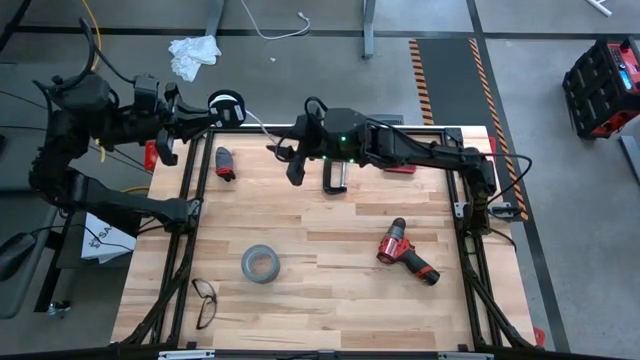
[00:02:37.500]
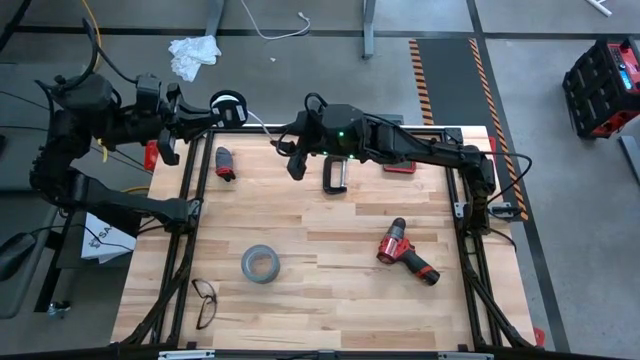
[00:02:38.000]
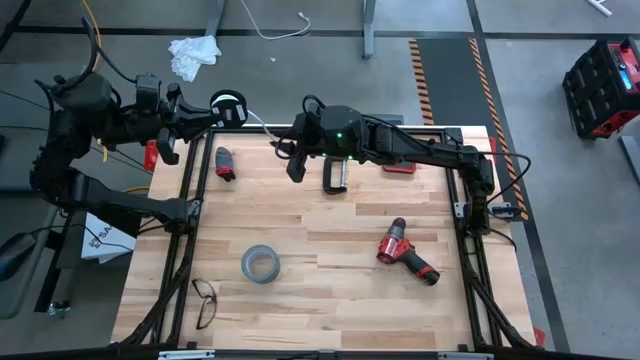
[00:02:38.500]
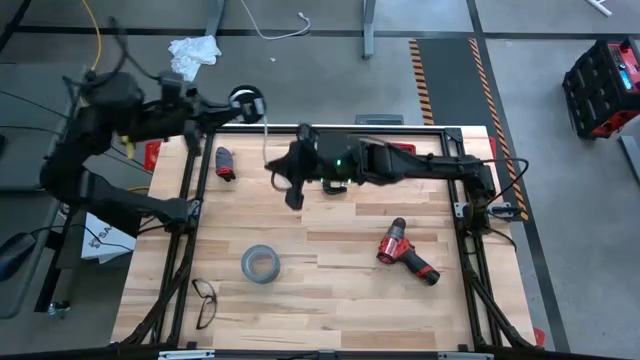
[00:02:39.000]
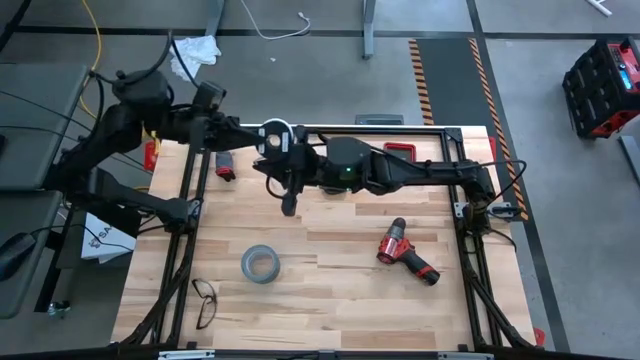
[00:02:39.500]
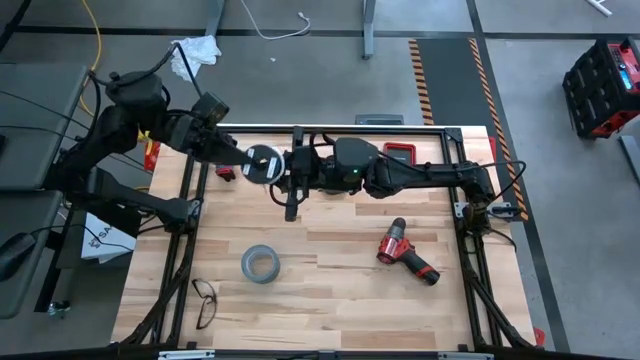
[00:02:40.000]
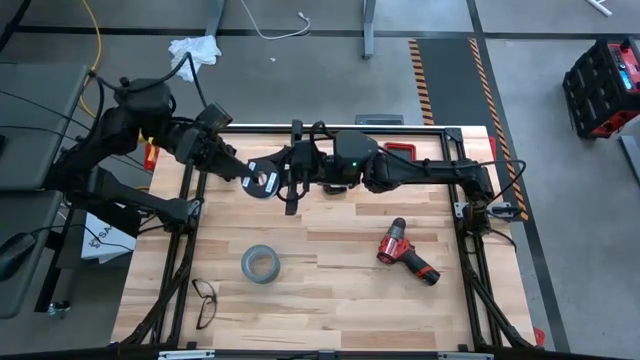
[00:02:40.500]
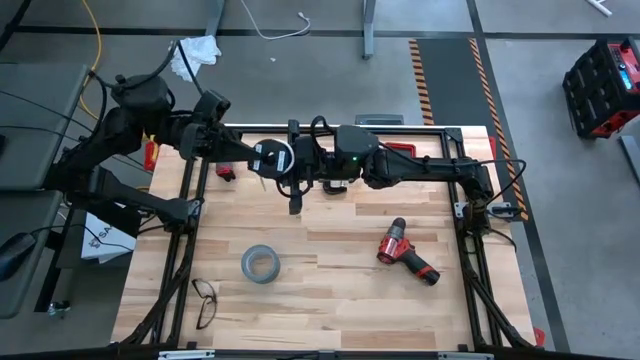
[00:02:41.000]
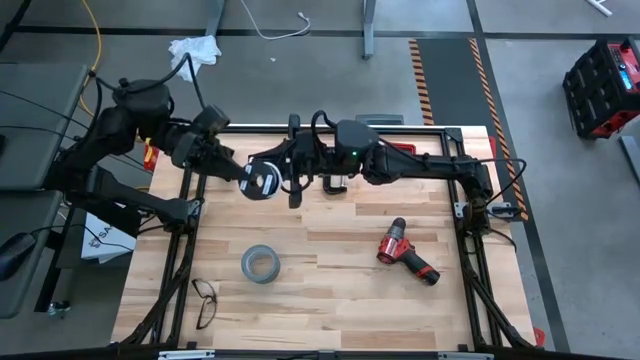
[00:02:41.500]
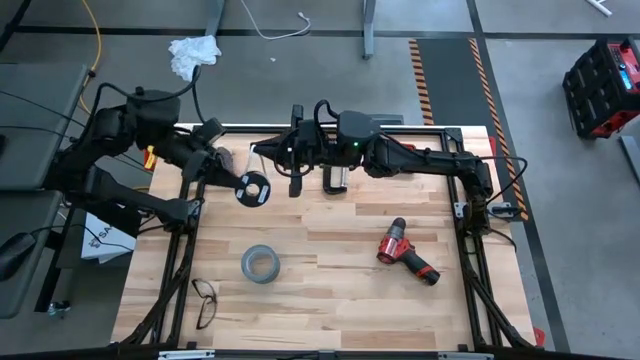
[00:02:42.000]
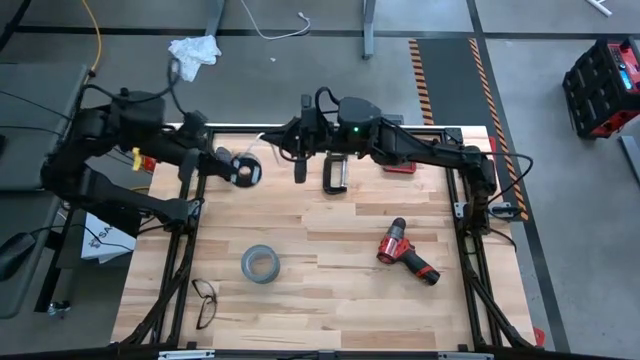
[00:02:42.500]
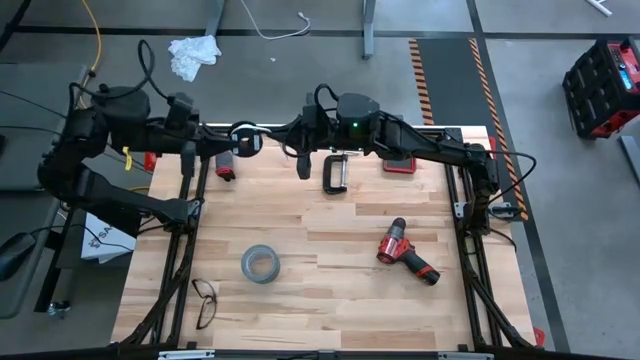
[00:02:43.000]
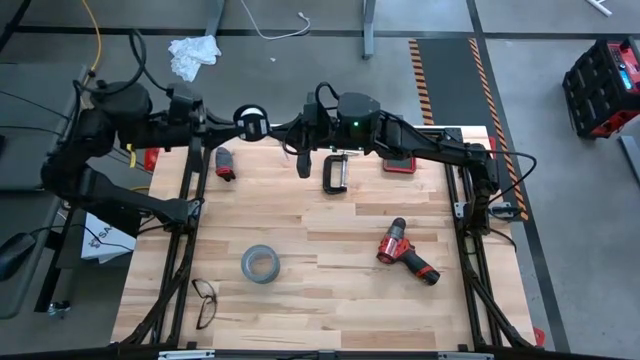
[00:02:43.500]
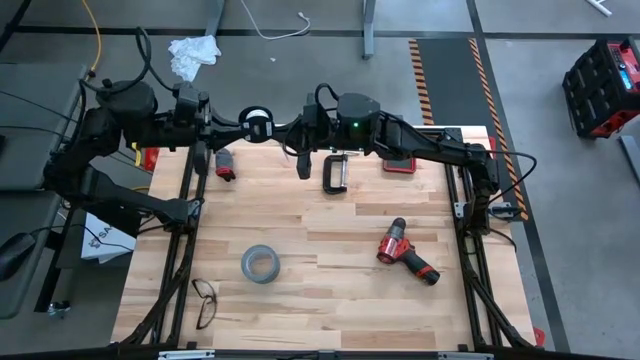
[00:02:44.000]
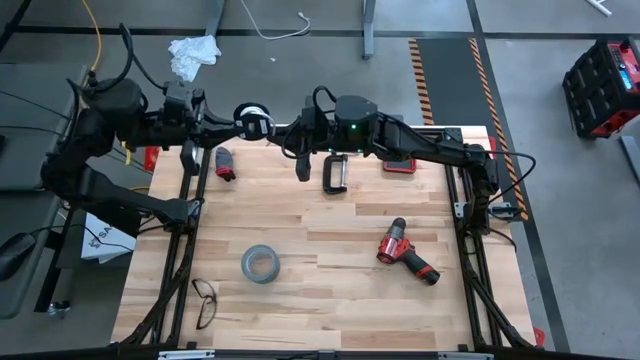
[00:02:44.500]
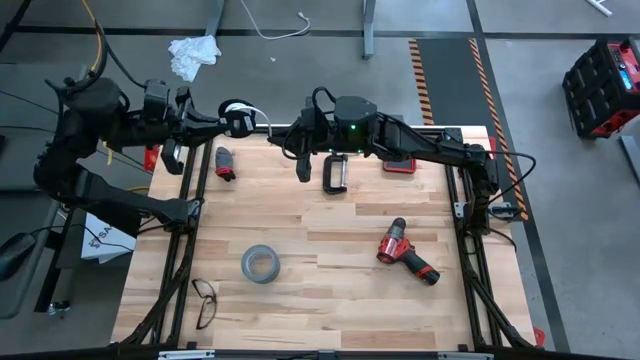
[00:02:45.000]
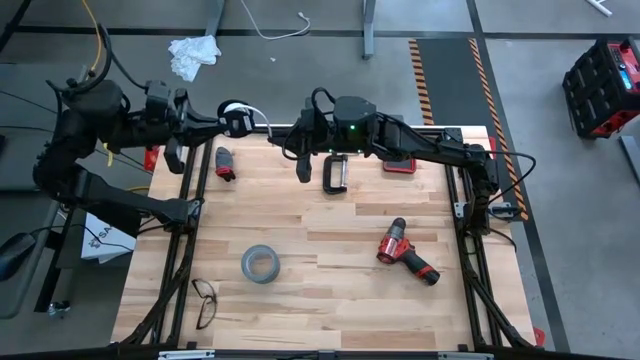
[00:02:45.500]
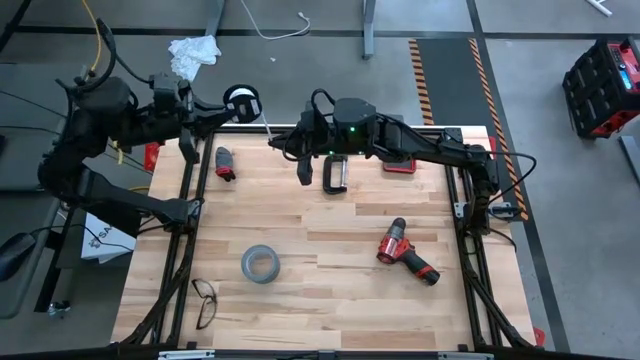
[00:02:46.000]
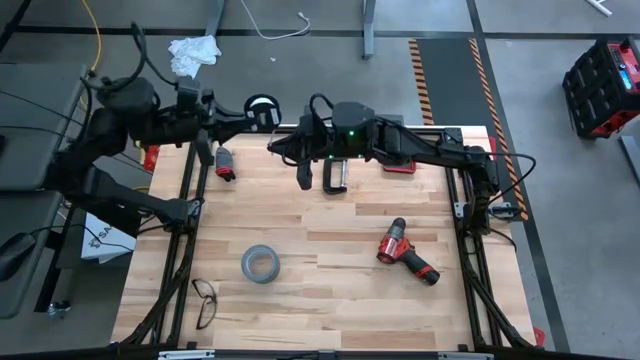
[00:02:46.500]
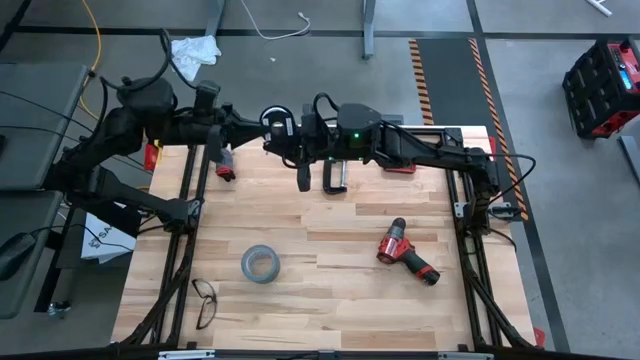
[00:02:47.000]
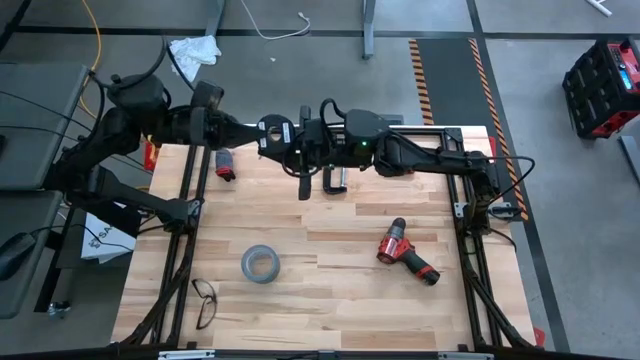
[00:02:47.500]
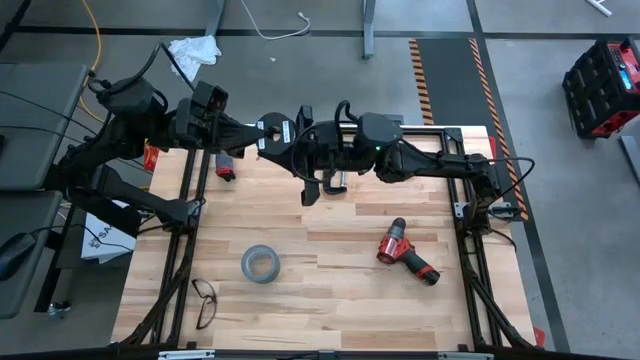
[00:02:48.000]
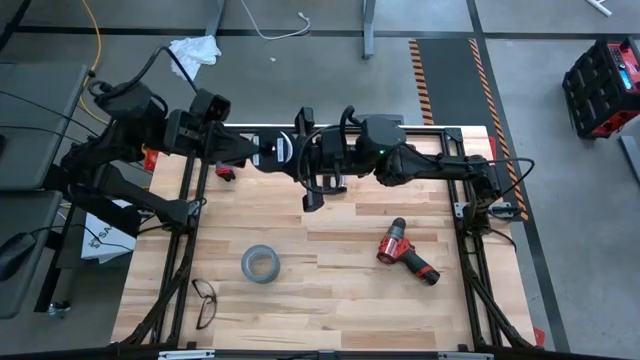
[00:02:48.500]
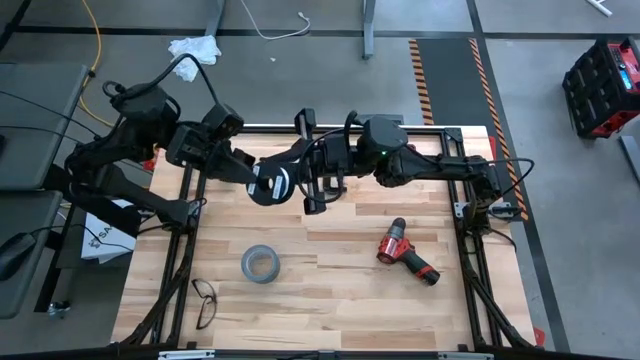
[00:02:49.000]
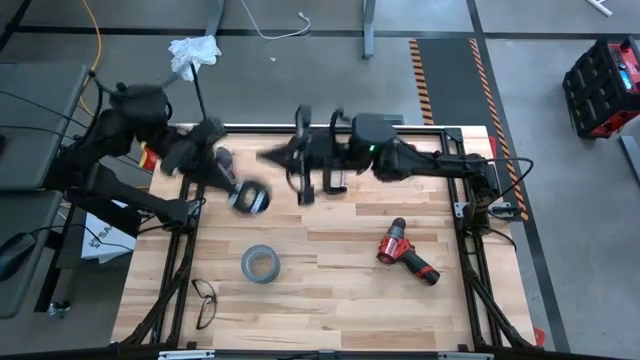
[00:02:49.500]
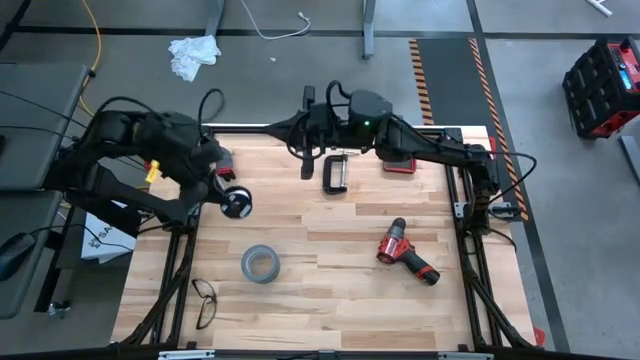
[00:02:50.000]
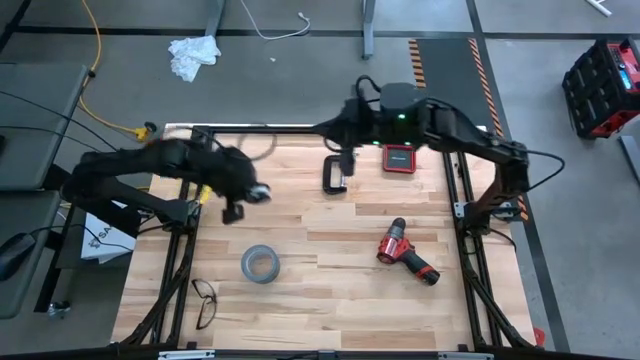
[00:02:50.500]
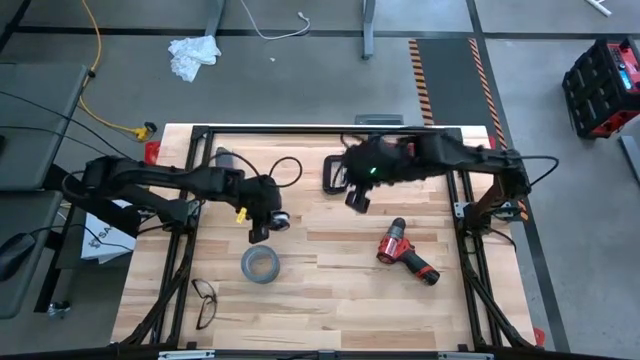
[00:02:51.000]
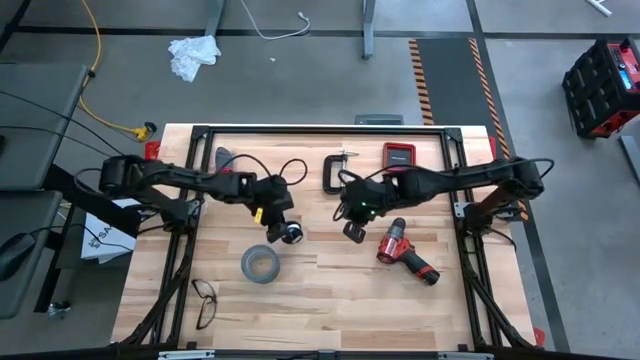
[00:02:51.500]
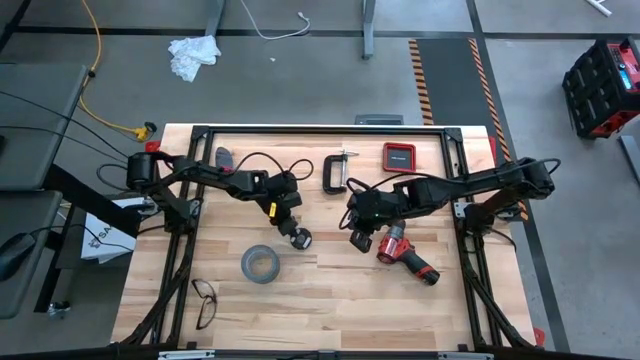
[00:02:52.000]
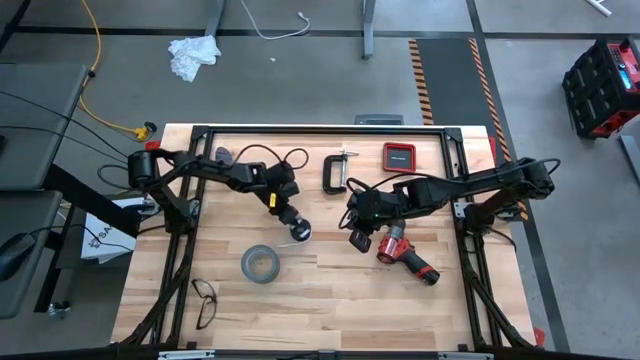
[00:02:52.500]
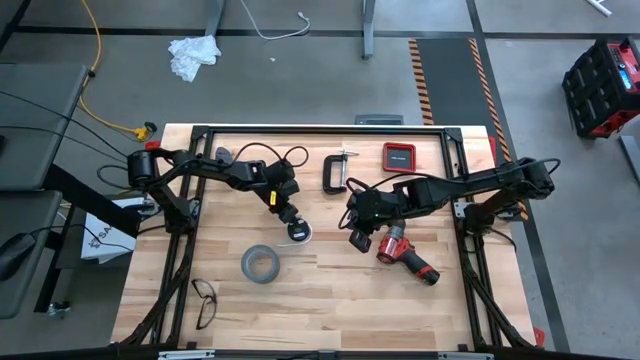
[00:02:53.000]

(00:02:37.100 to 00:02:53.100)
Task: Coil cords
Coil the white wire

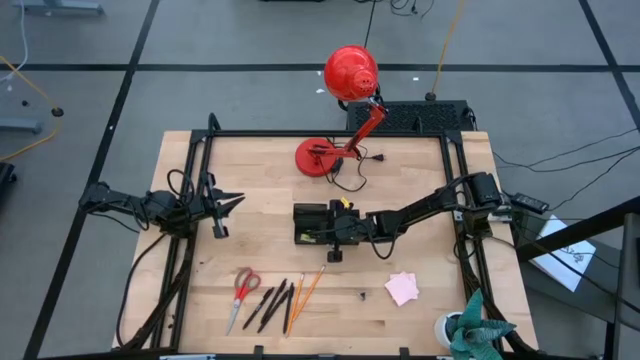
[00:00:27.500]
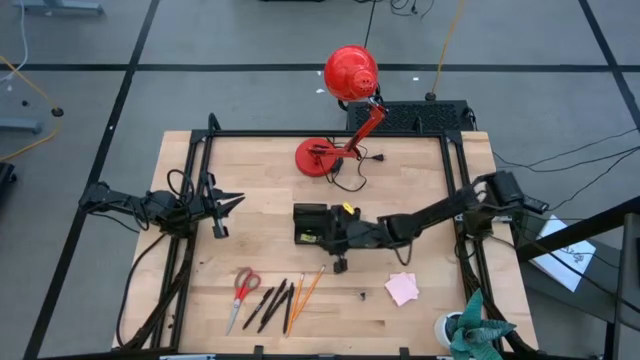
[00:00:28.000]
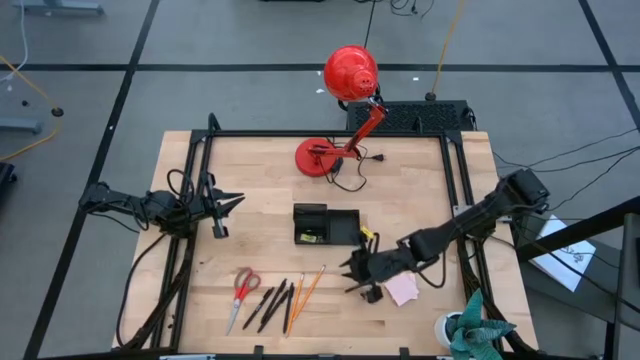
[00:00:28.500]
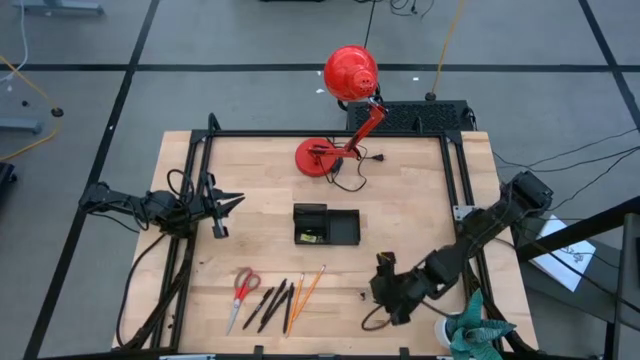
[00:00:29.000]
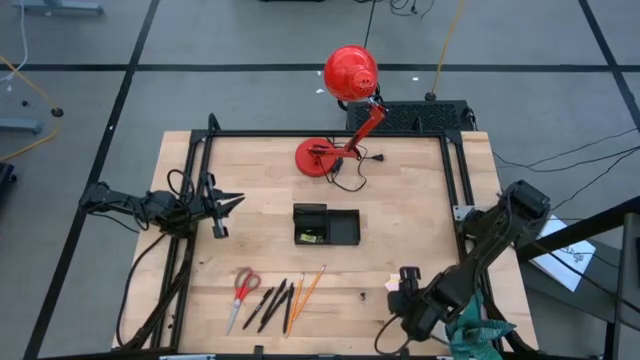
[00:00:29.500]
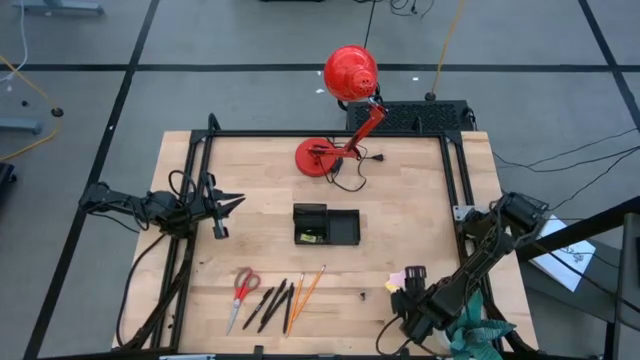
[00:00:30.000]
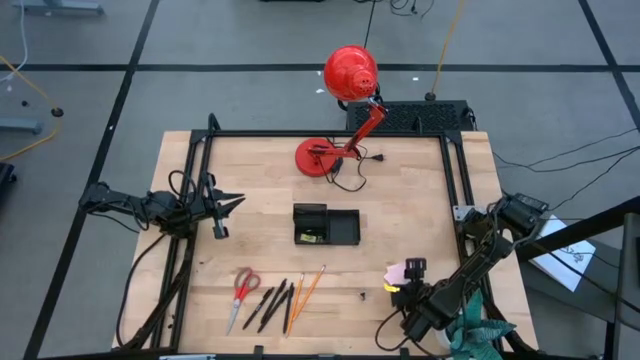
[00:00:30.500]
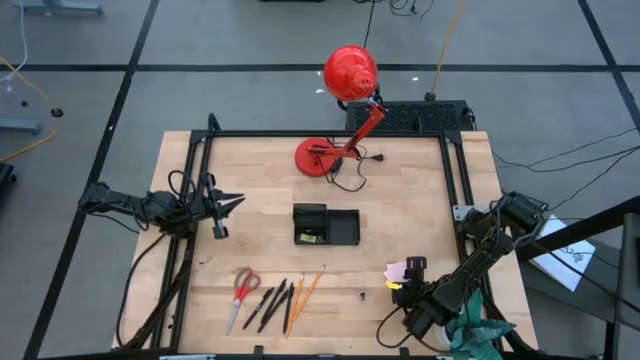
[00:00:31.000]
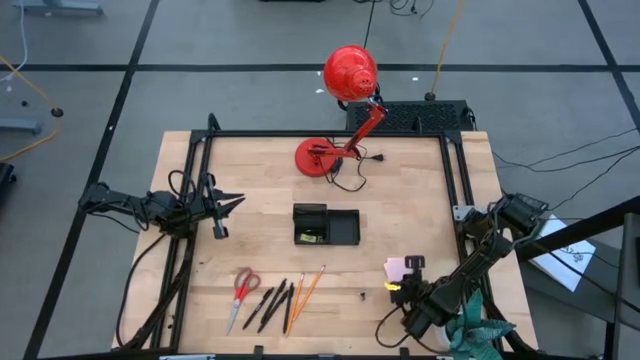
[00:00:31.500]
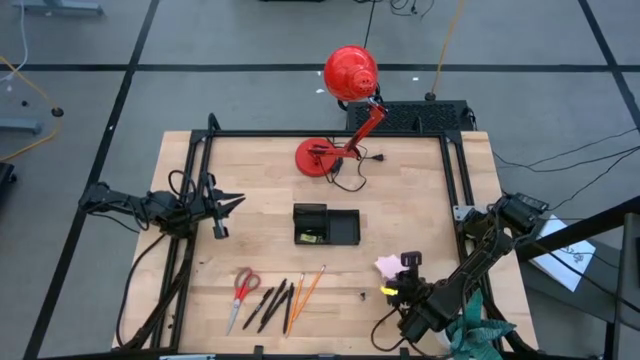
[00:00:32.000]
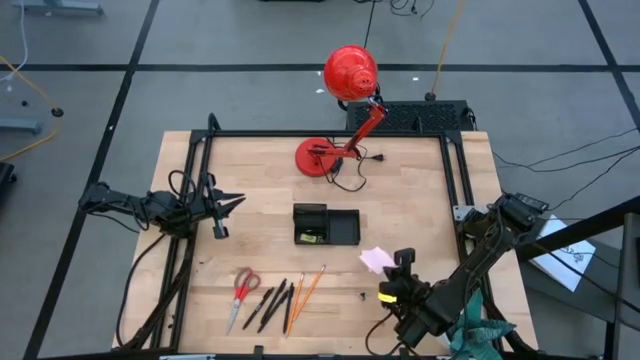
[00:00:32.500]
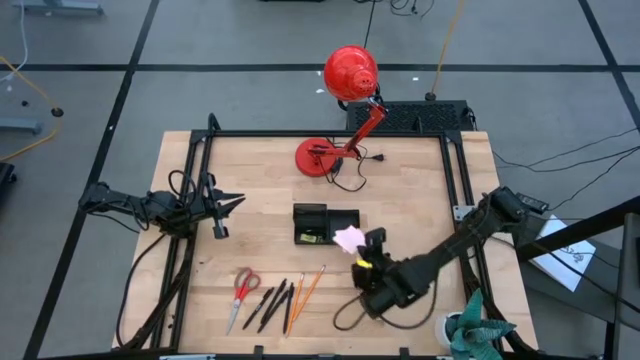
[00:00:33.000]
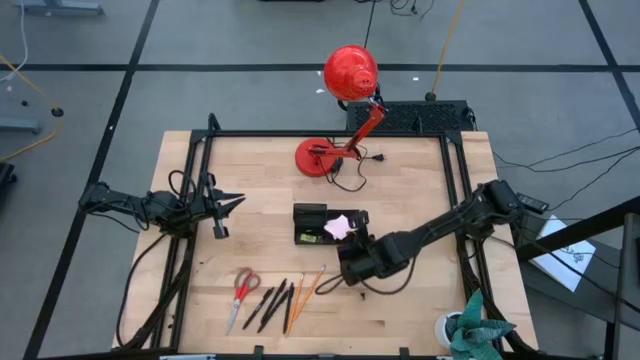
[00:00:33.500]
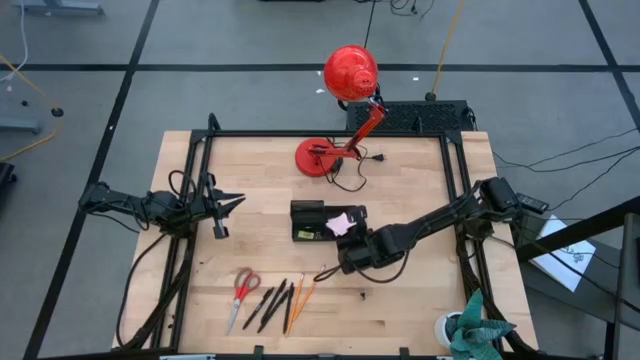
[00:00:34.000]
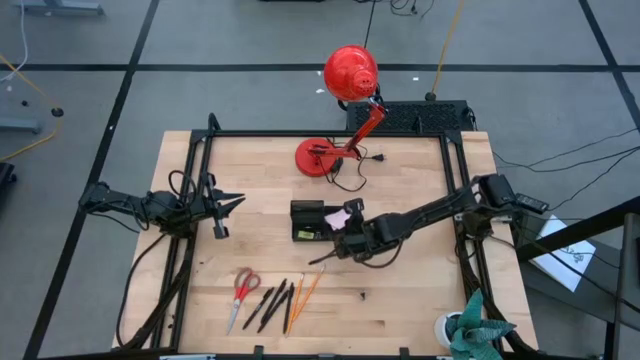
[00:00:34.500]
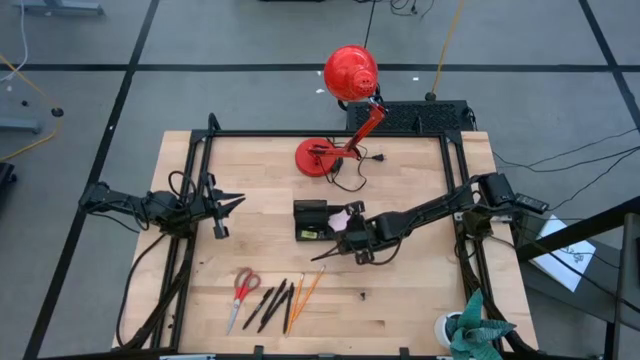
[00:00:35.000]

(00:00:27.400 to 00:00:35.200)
Task: Pick and place office supplies into organizer
Put the sticky note into the desk organizer
